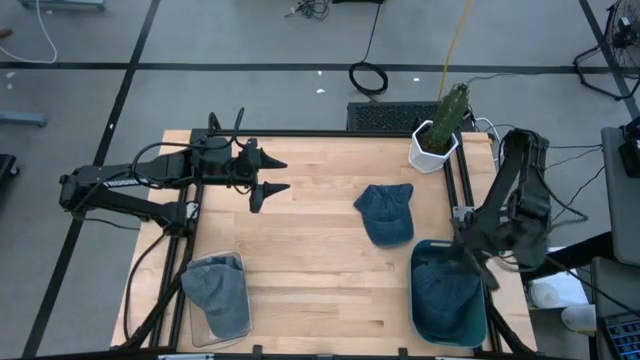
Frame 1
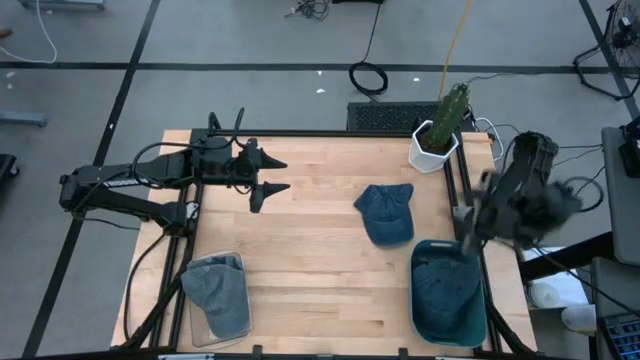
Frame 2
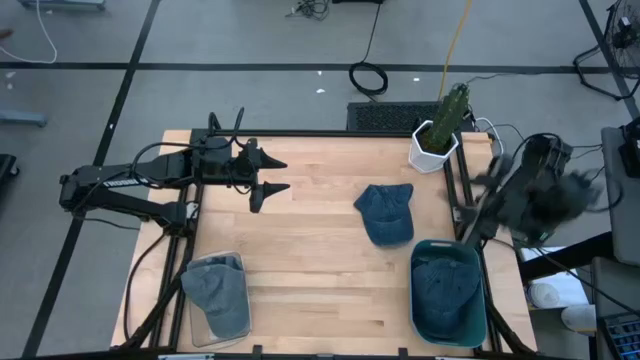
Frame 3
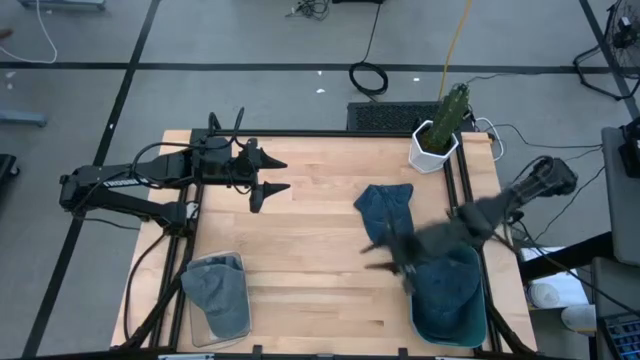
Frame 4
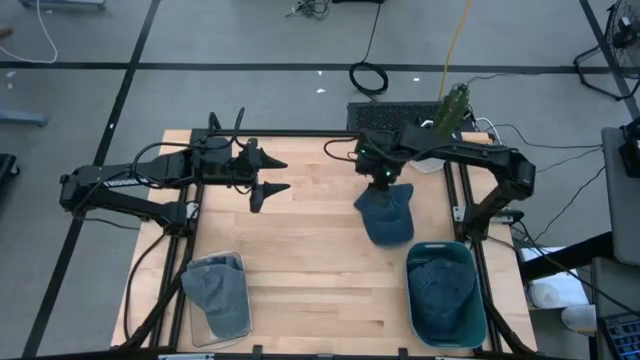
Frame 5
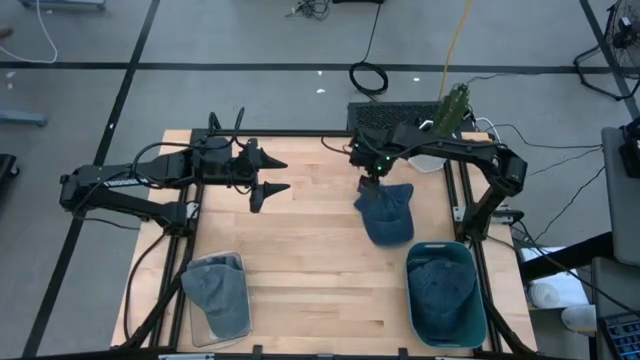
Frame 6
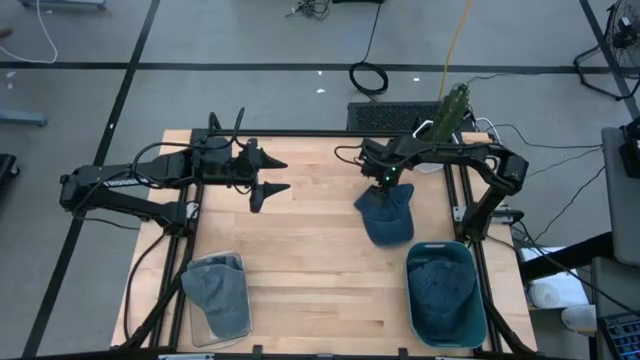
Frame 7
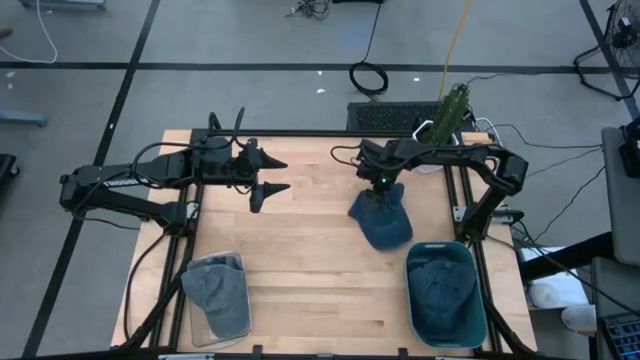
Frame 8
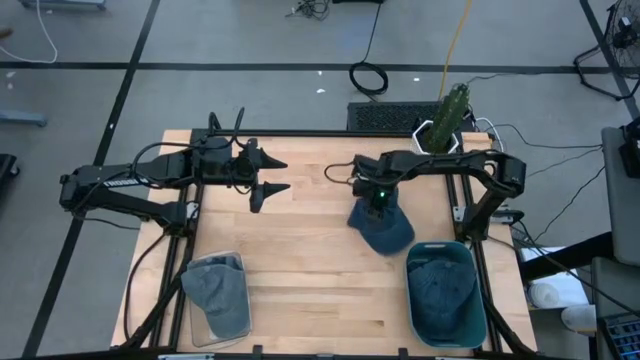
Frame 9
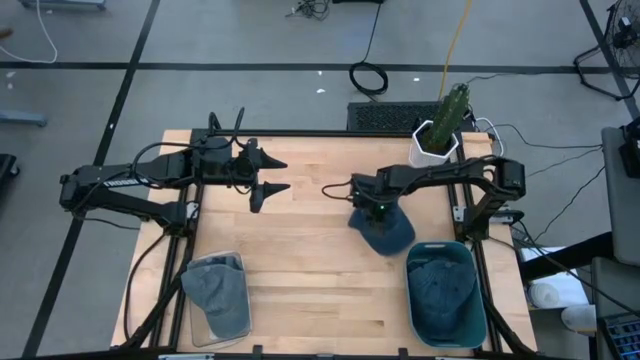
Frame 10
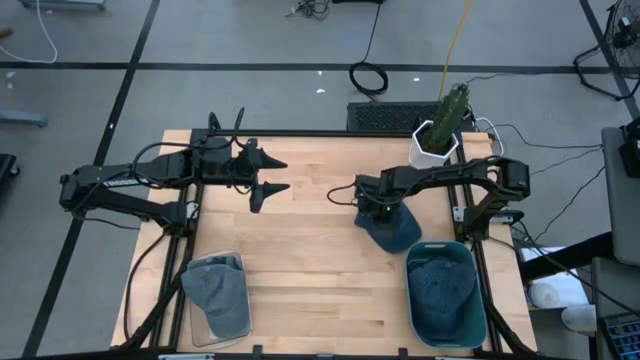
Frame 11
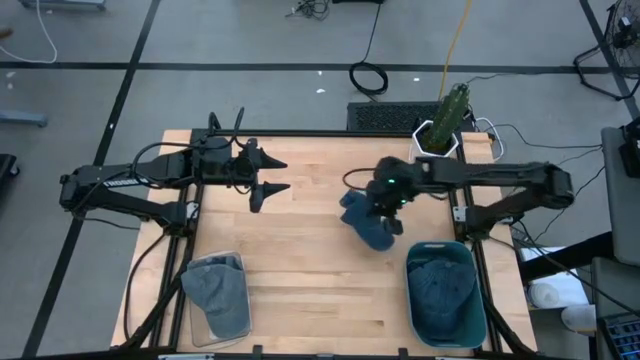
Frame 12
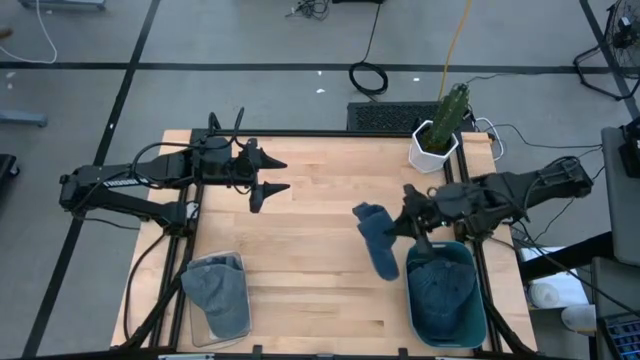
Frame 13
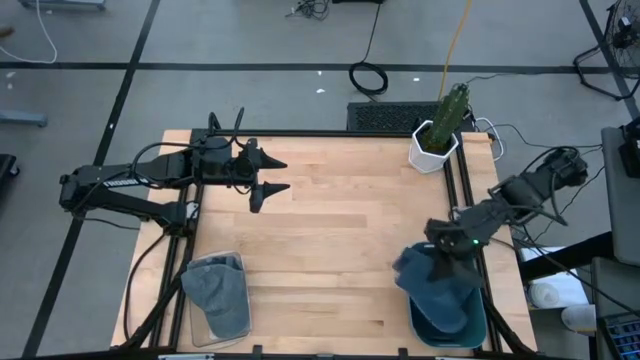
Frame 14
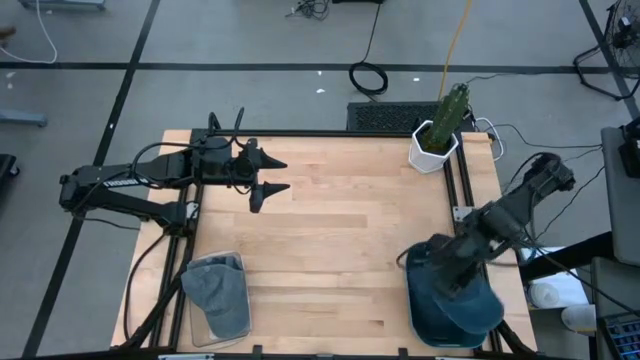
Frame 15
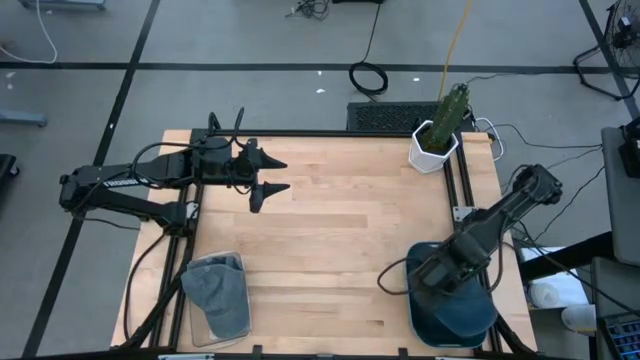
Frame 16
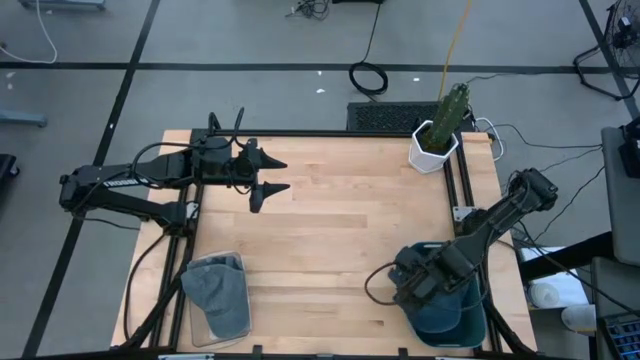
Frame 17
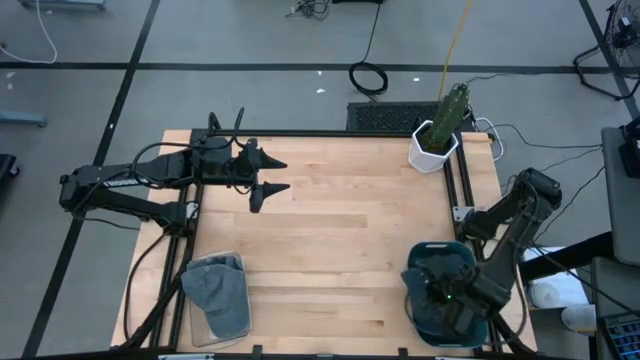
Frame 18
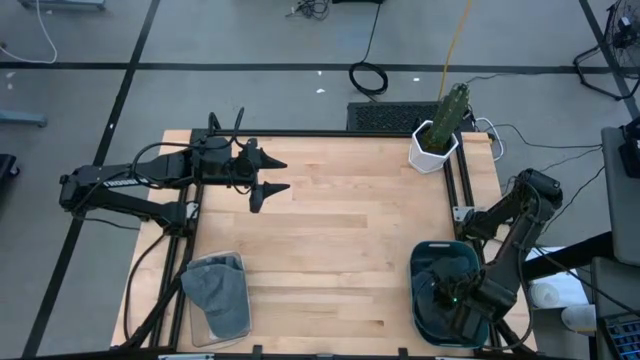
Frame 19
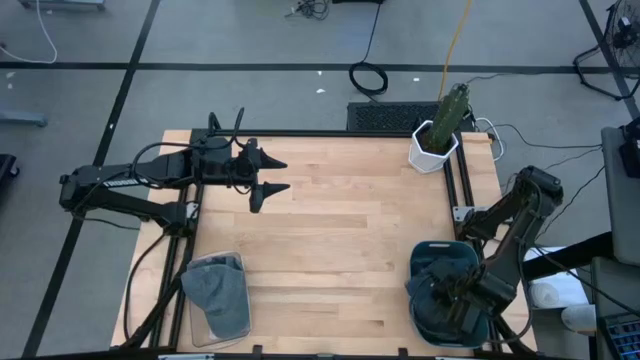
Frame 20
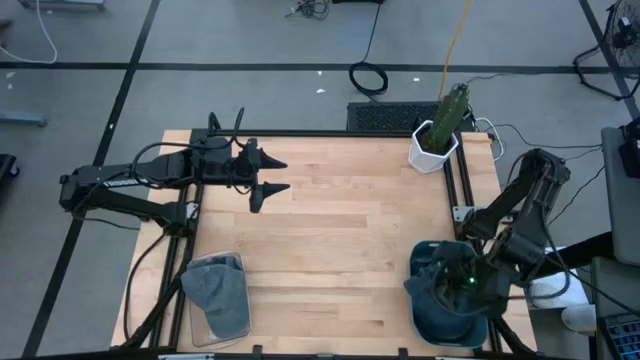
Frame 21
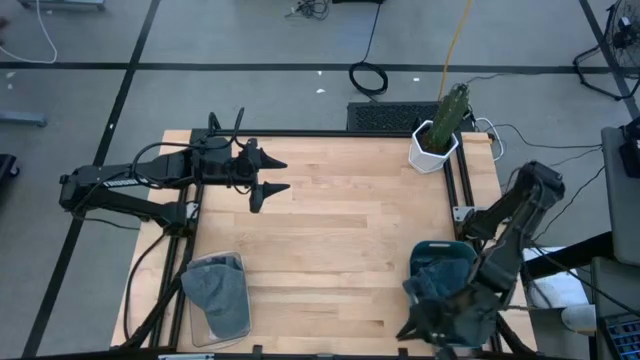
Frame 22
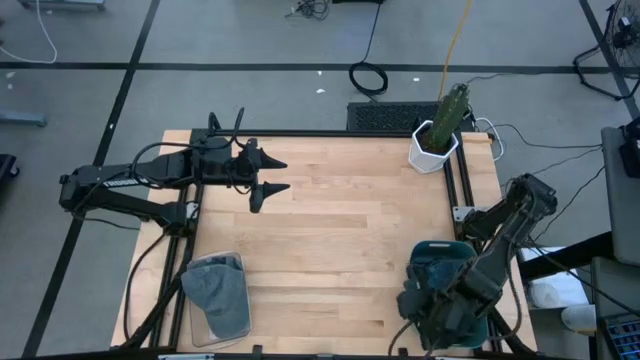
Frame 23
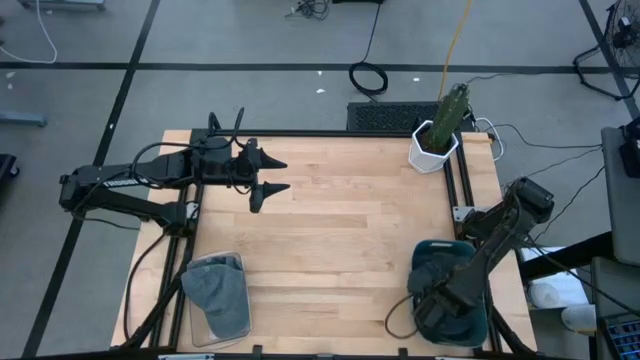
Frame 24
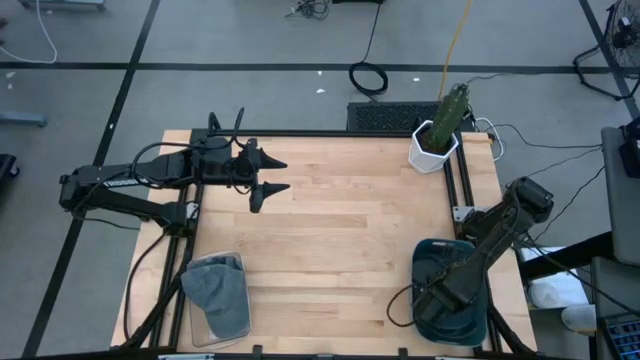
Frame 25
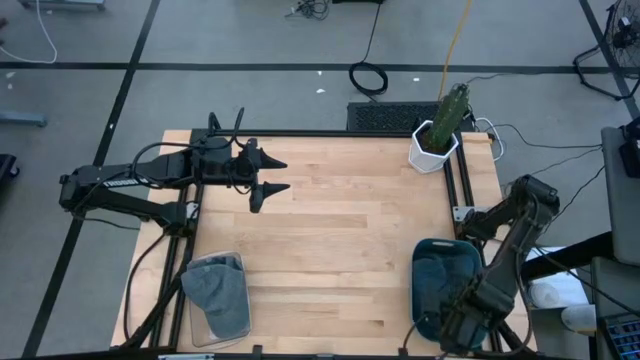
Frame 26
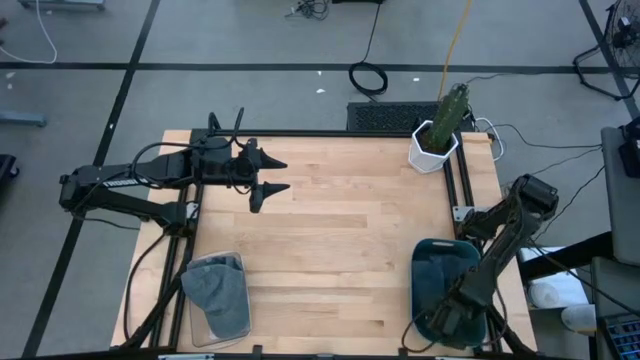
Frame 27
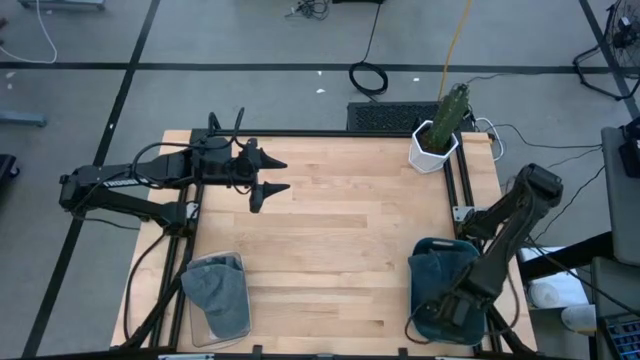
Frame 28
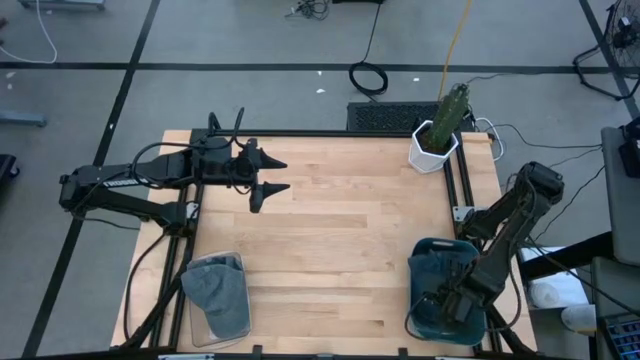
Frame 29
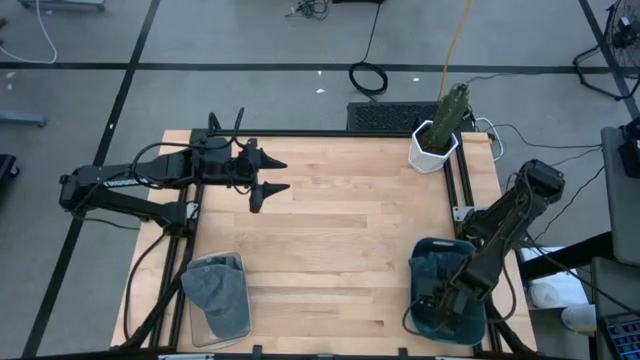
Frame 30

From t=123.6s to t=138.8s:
Task: Pick & Place hat
Put the blue cap into the blue bin

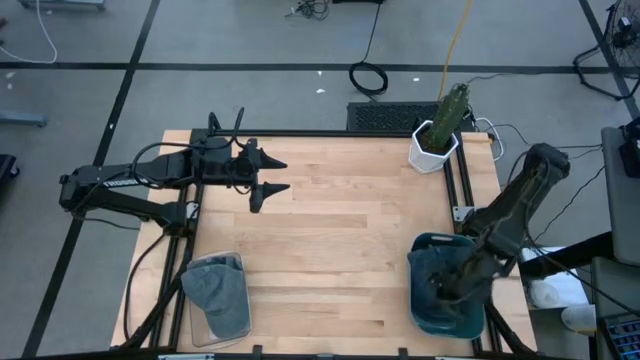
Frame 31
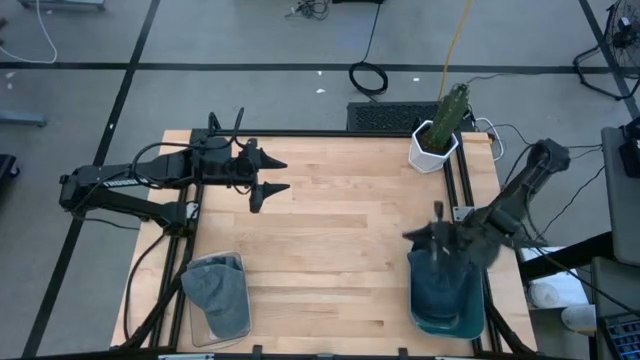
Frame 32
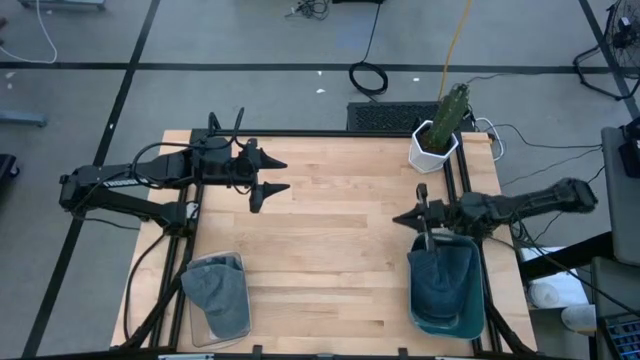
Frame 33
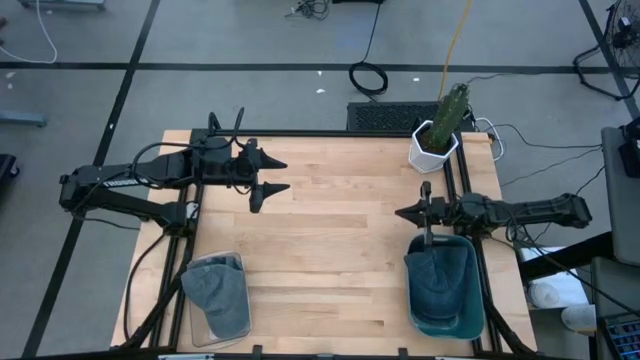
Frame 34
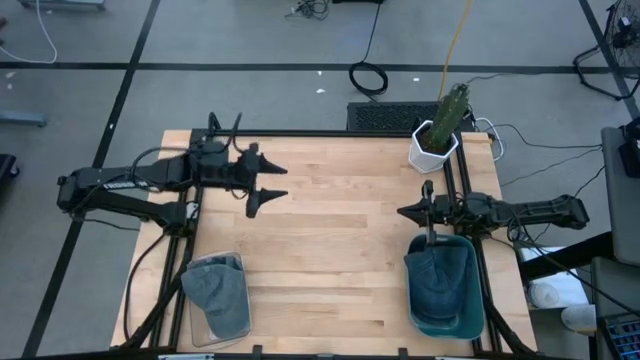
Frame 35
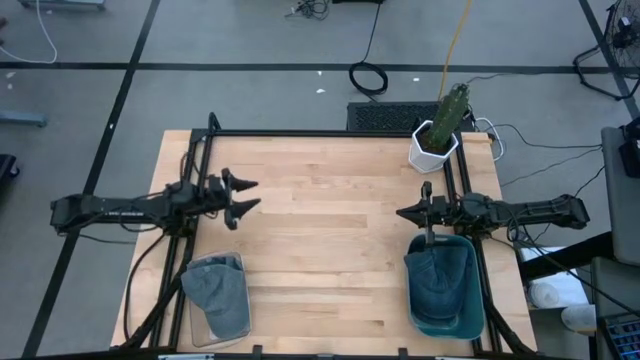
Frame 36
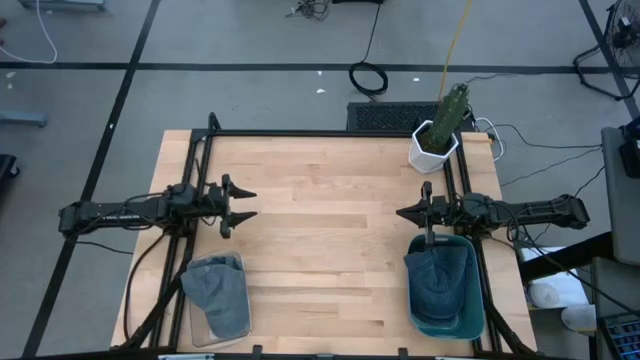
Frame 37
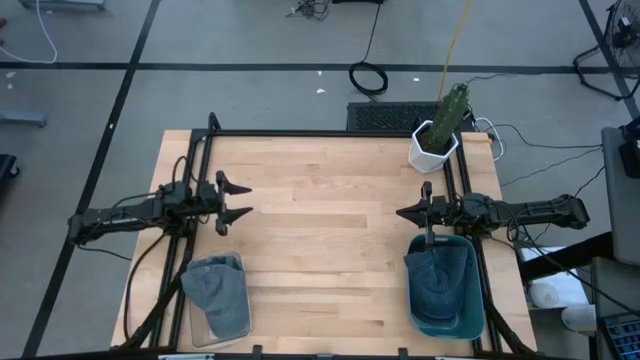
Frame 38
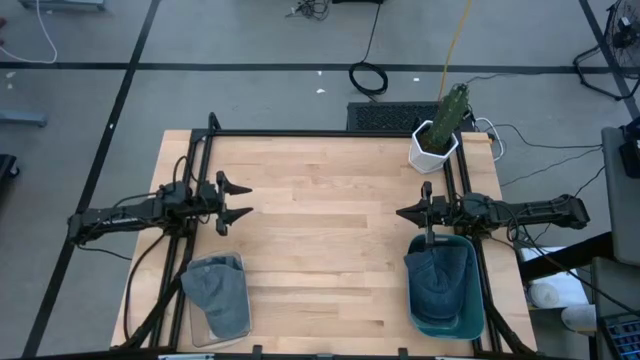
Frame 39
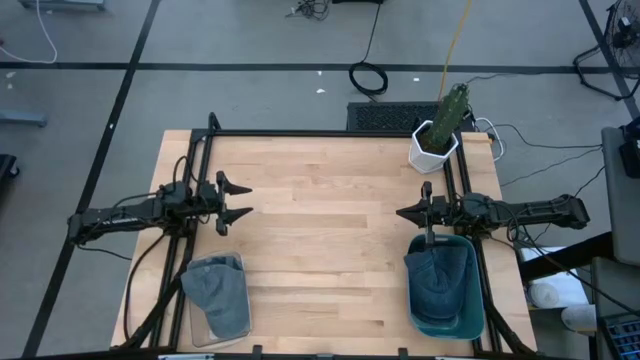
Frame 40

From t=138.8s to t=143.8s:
Return to Home Position
